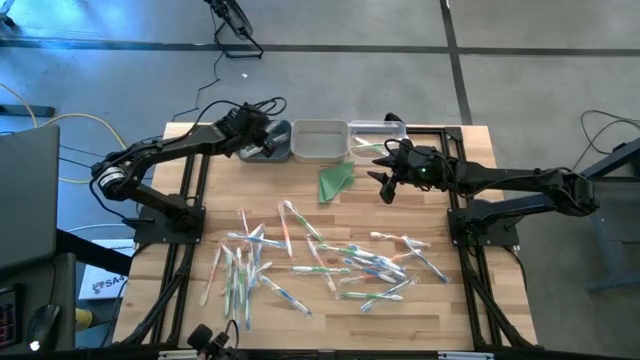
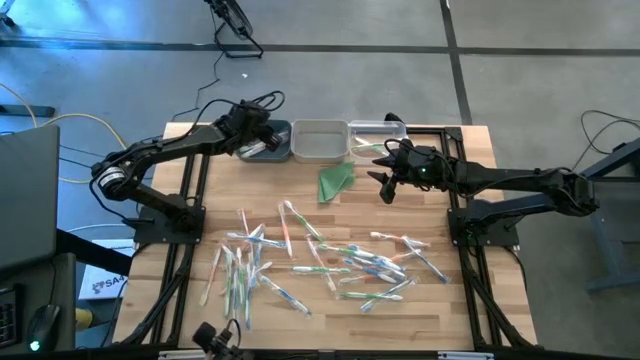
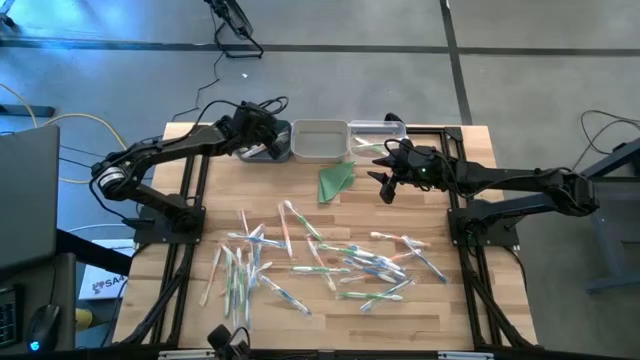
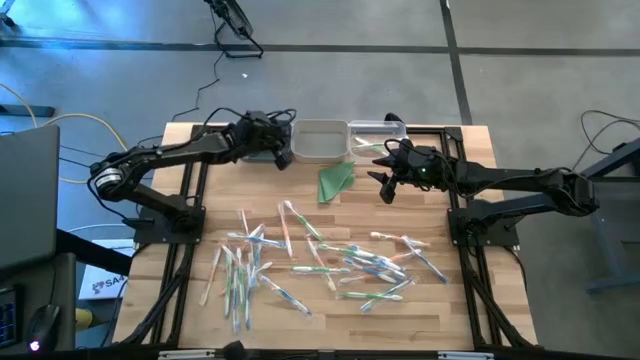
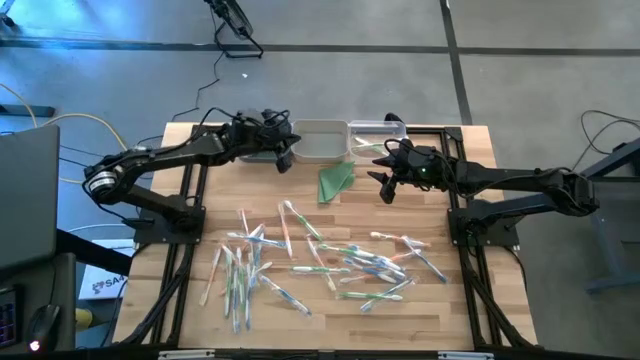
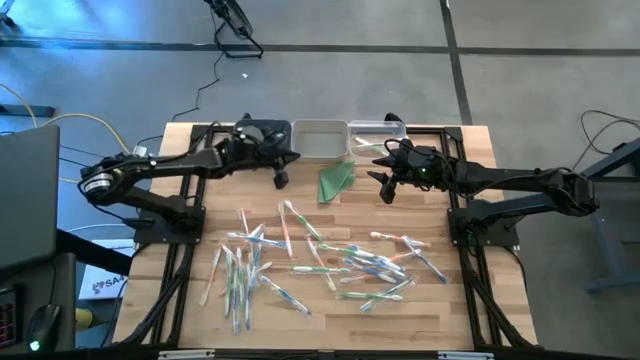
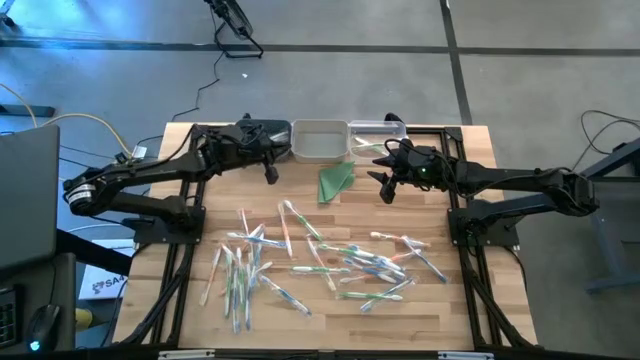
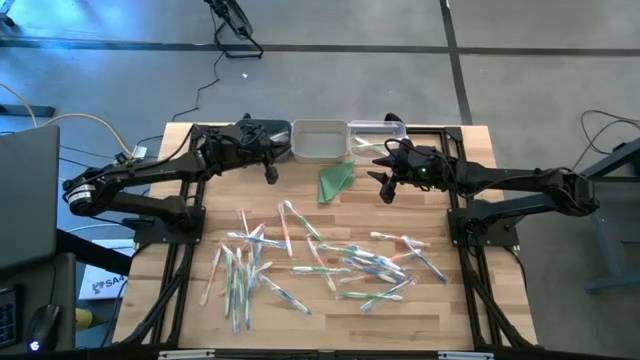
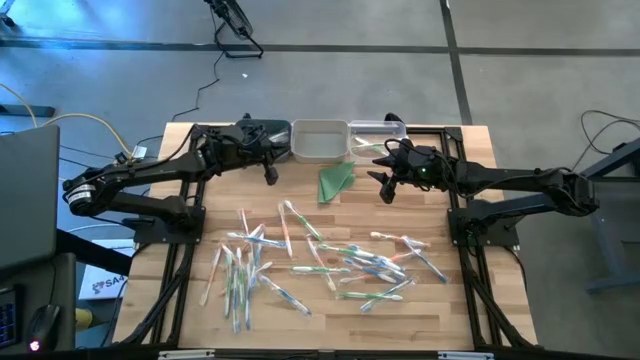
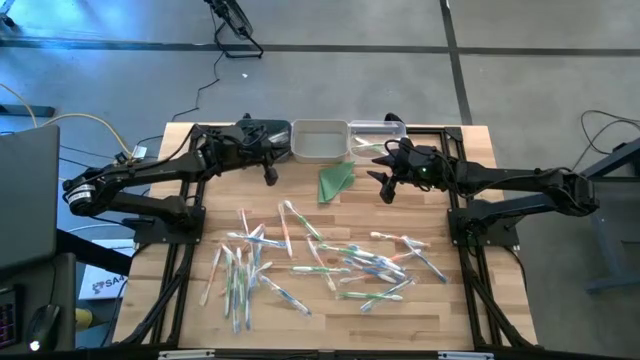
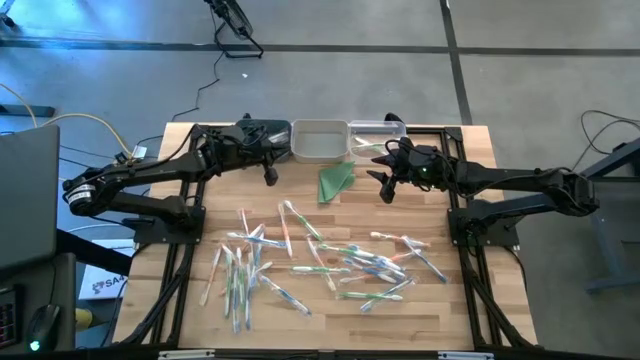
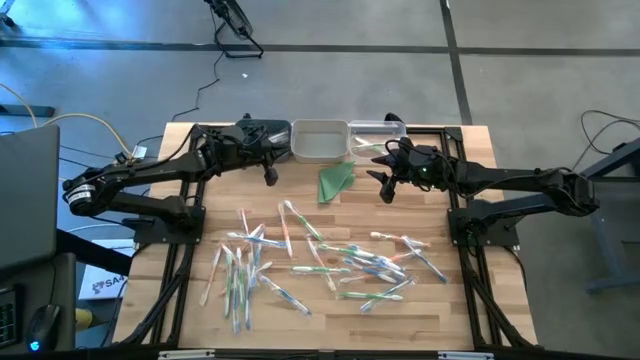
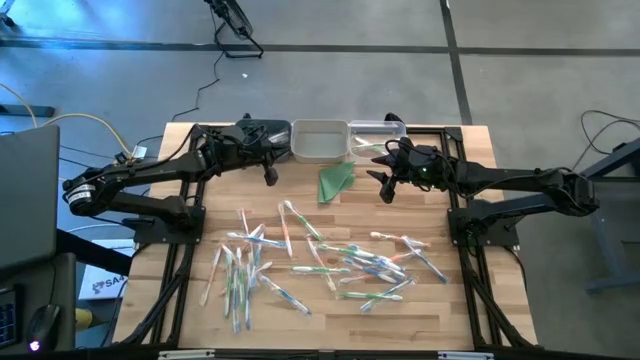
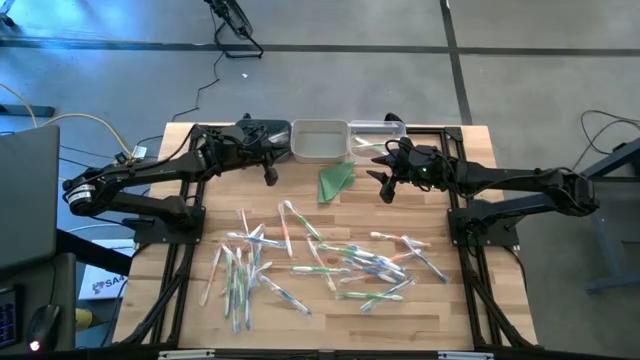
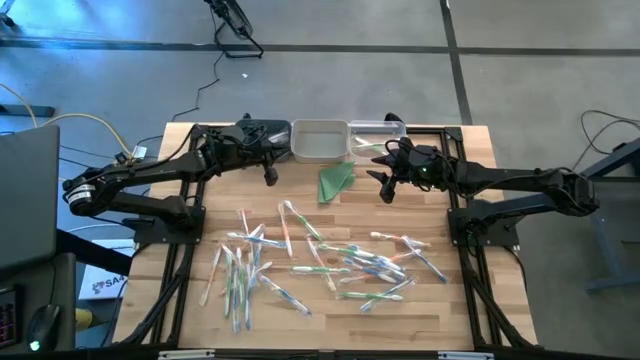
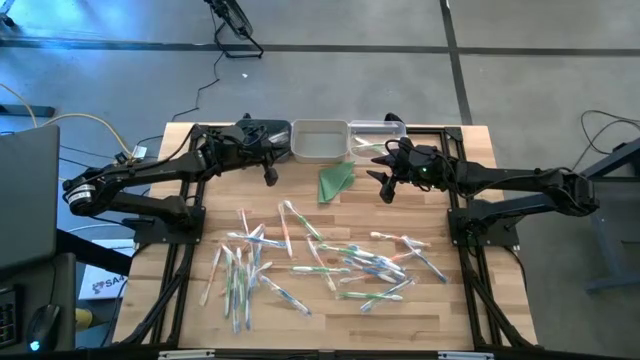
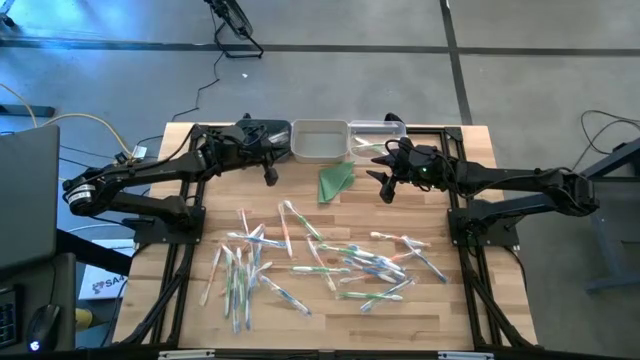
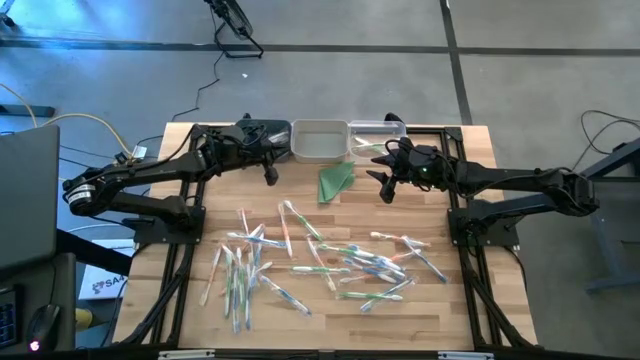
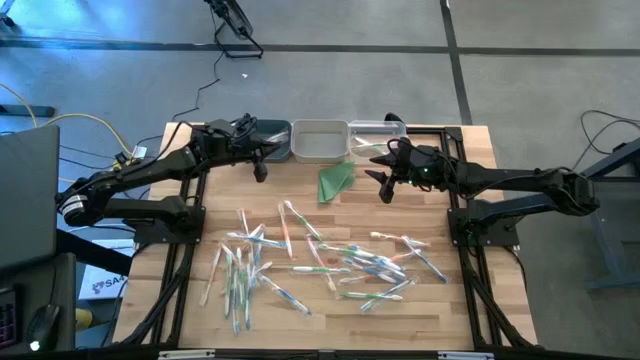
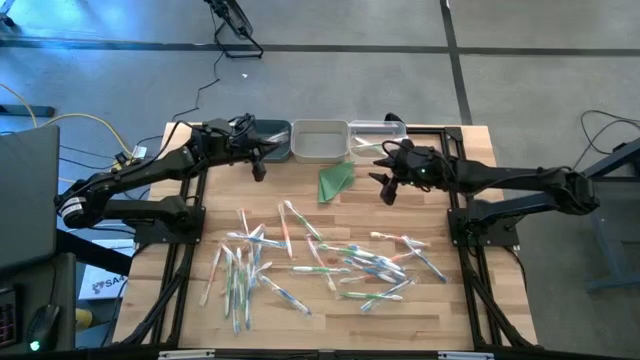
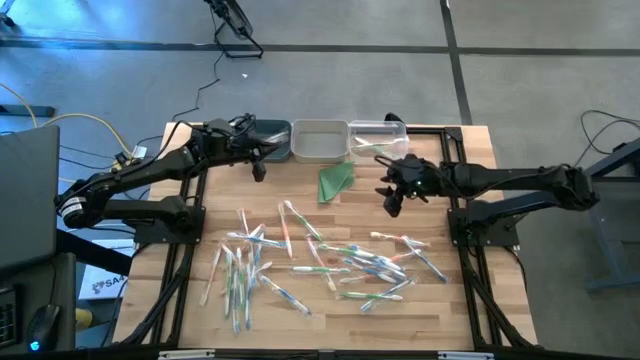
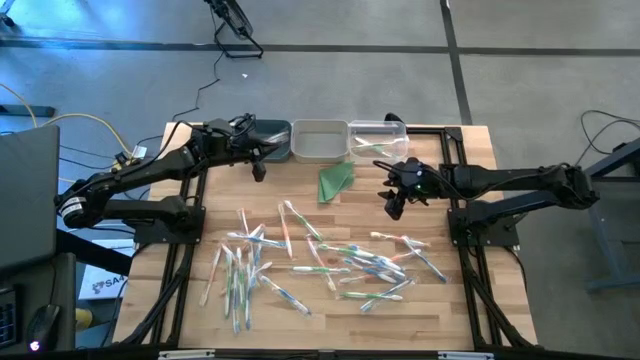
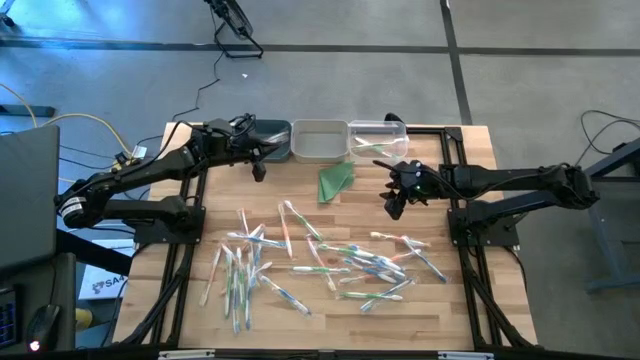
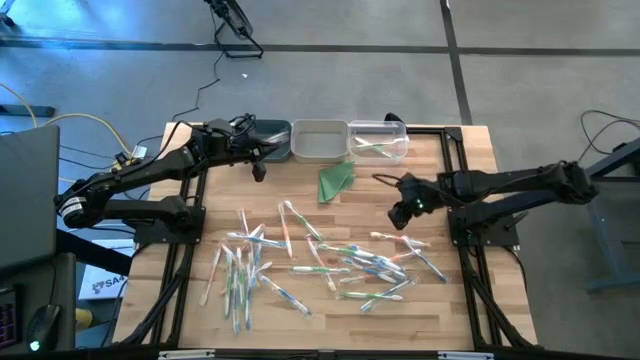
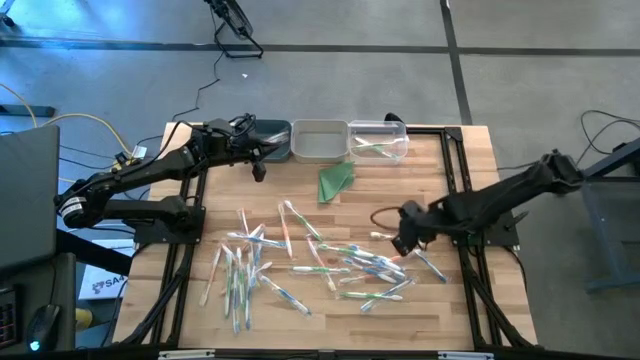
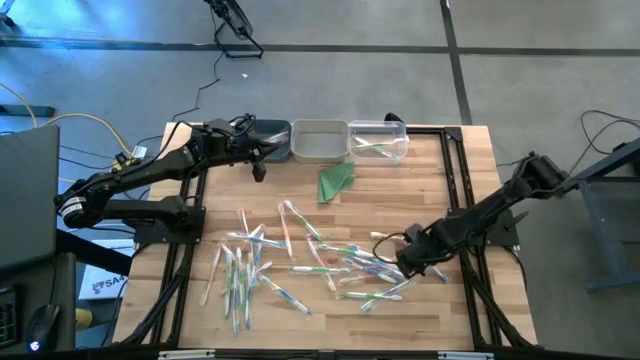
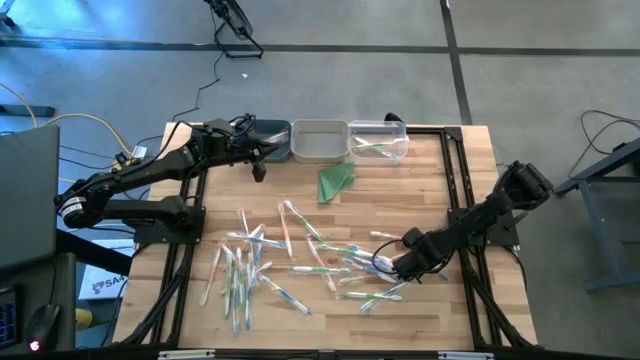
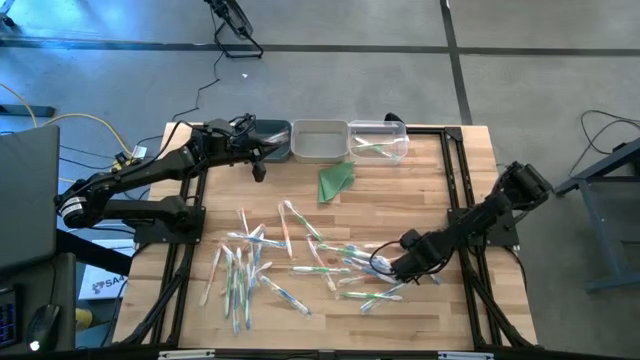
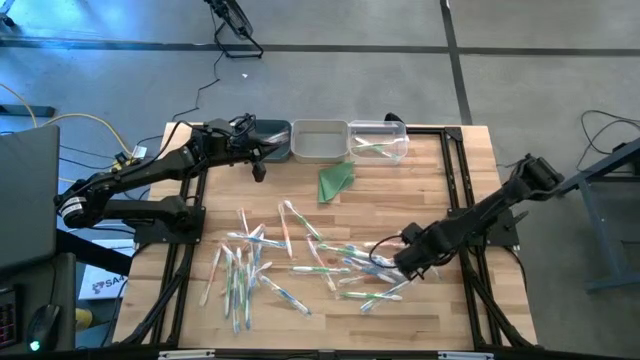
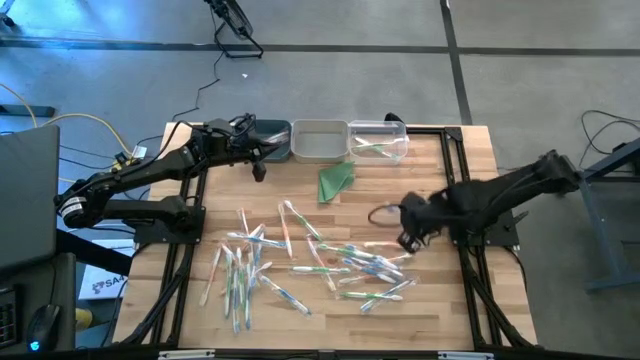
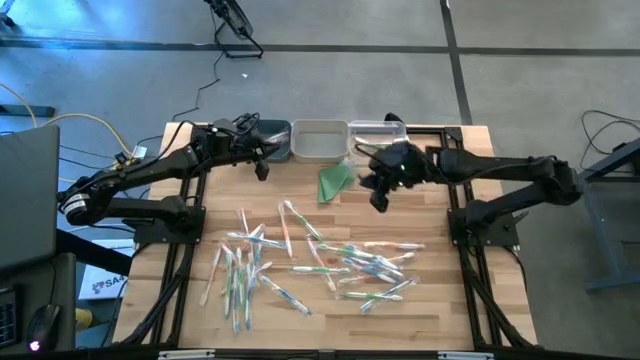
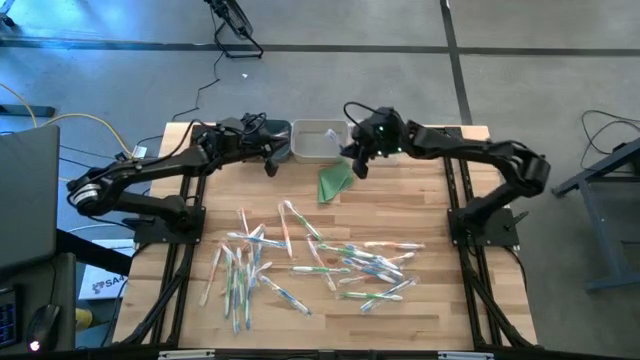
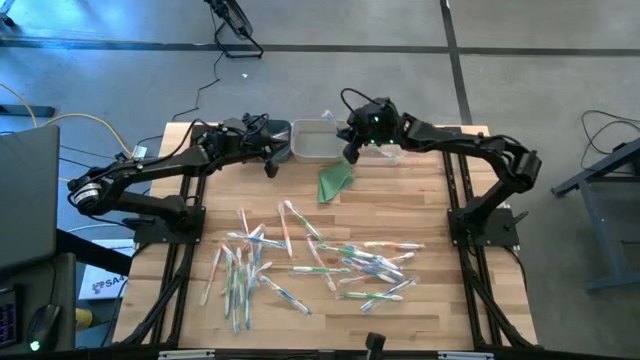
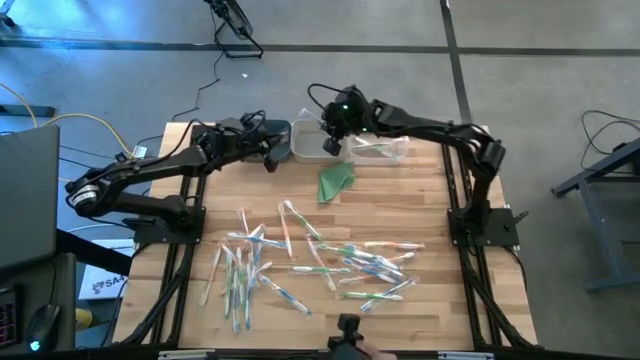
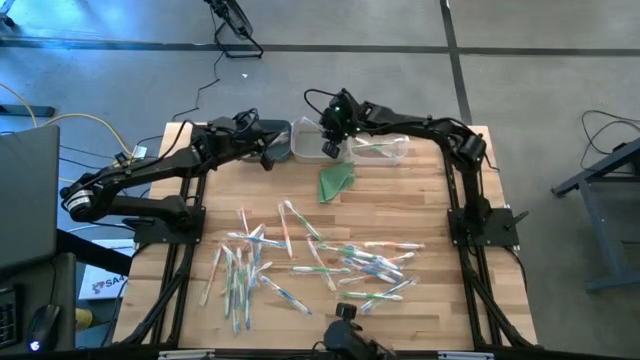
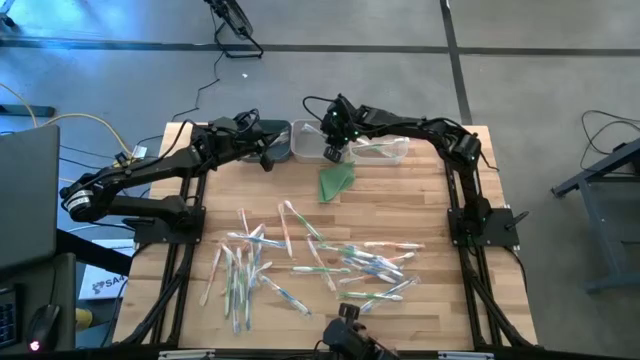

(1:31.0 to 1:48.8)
Task: Pick & Place Toothbrushes
Put the blue toothbrush into the gray bin

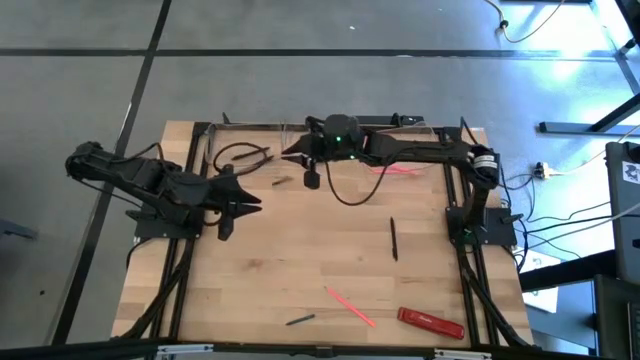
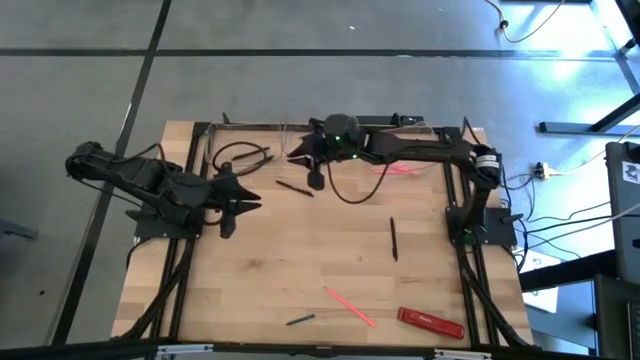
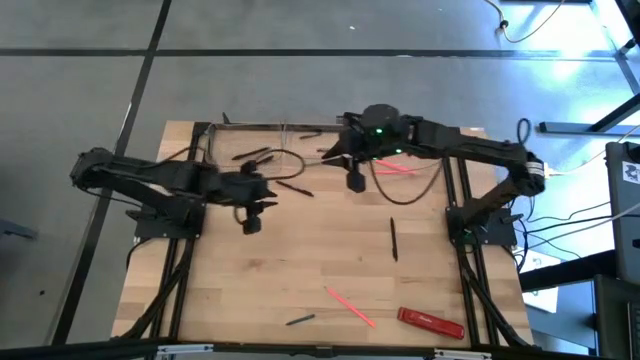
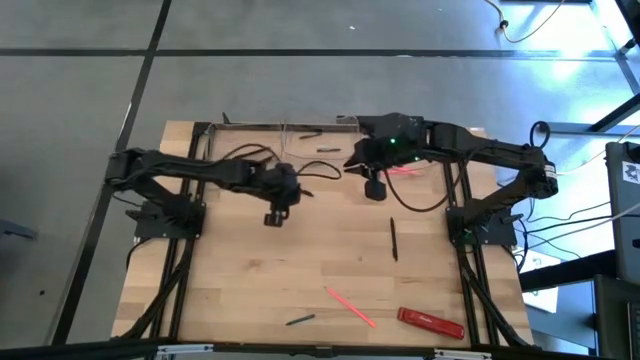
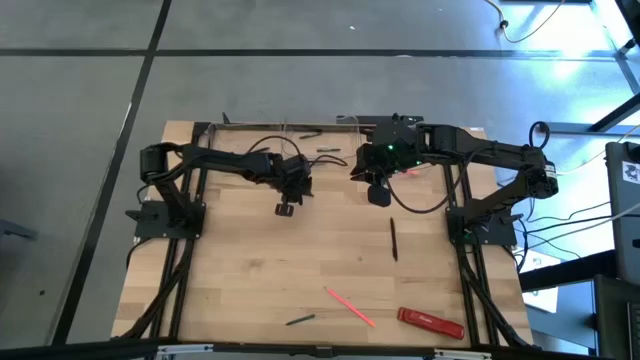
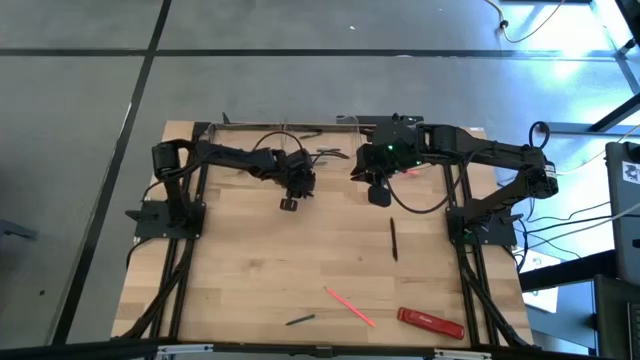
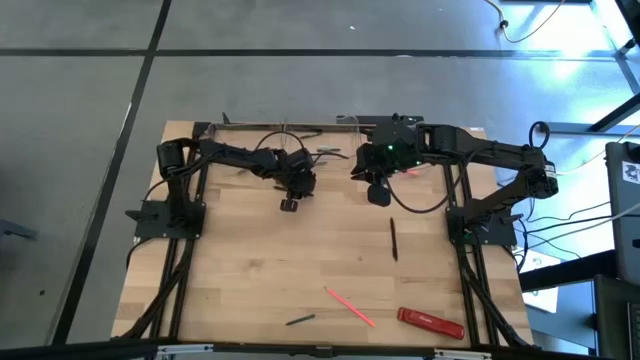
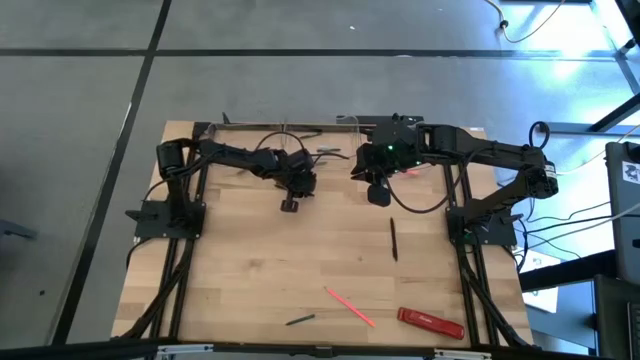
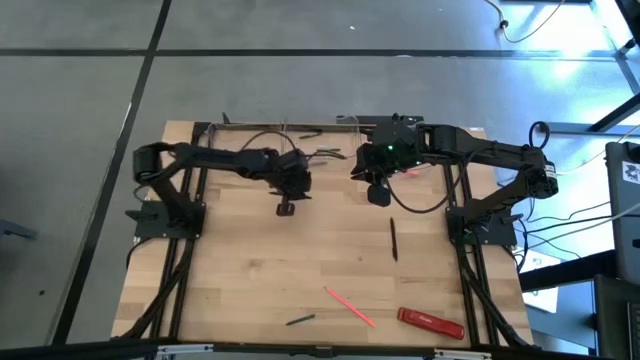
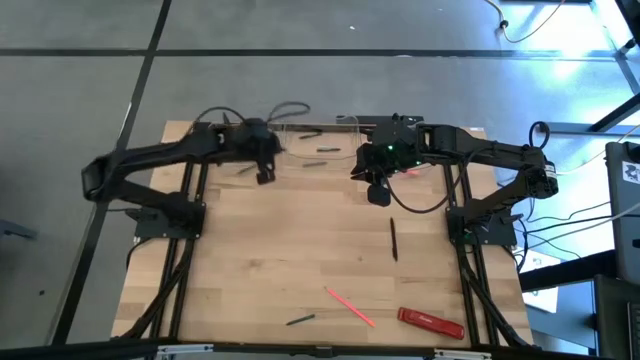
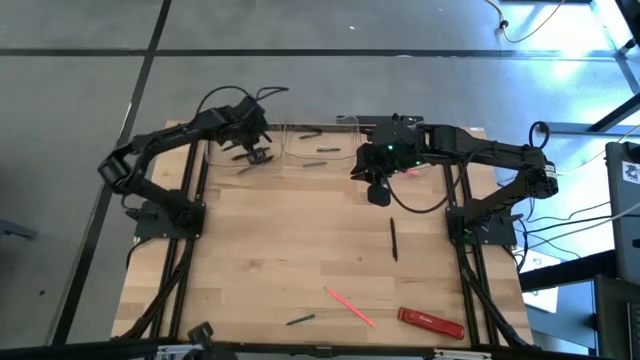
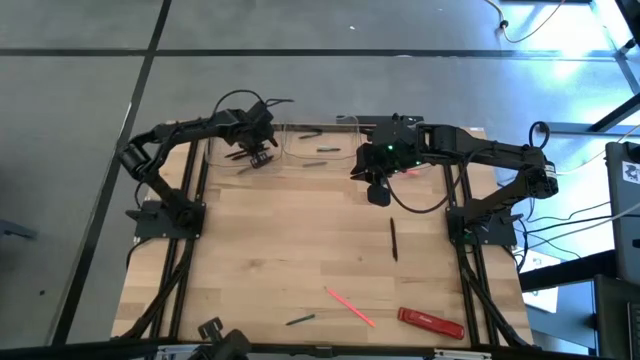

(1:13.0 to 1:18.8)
Task: Sort crayons/erasers/pens/pencils in bins
Put the black pen into the left transparent bin
